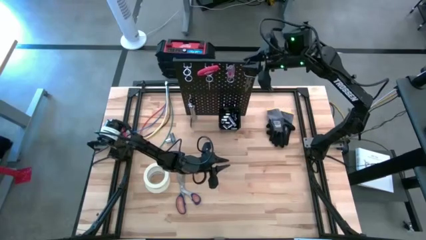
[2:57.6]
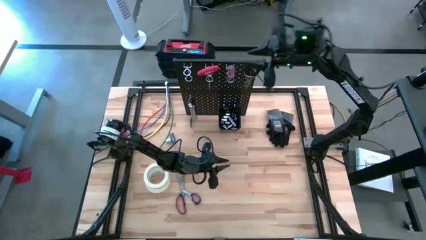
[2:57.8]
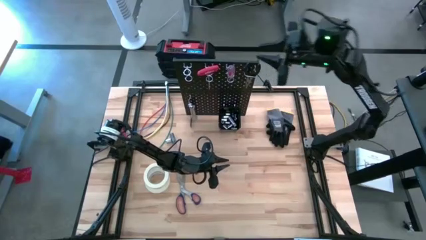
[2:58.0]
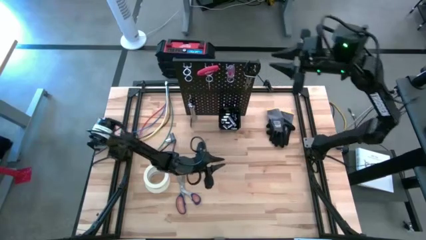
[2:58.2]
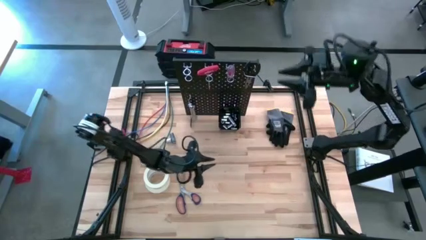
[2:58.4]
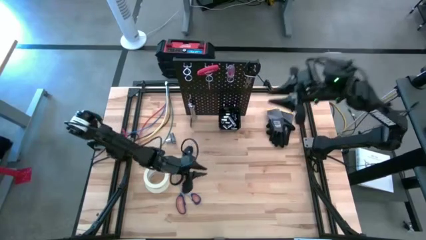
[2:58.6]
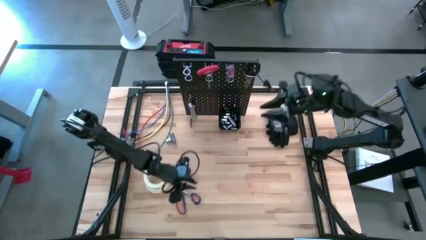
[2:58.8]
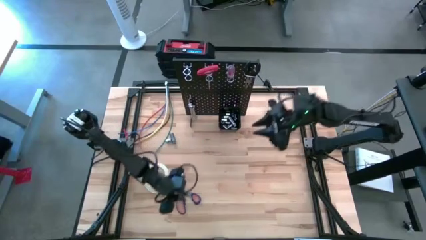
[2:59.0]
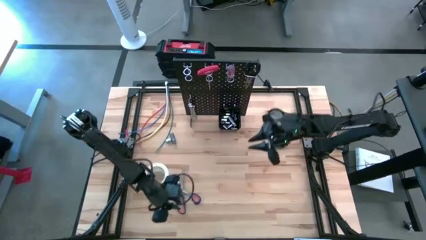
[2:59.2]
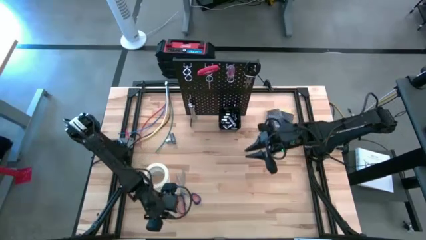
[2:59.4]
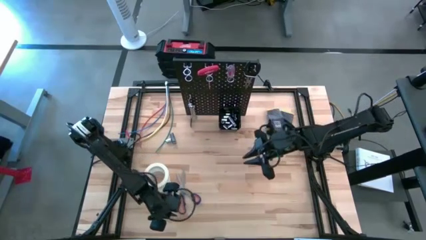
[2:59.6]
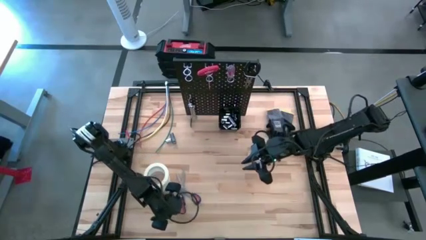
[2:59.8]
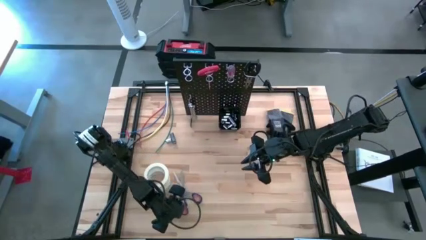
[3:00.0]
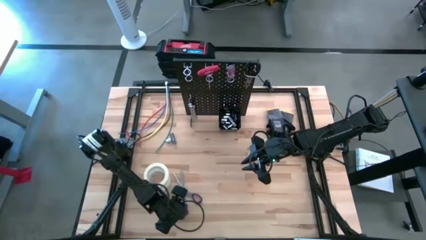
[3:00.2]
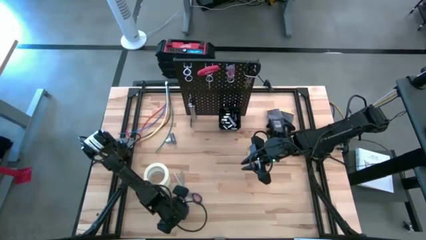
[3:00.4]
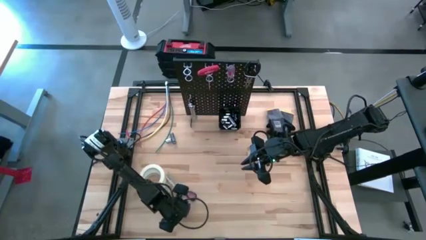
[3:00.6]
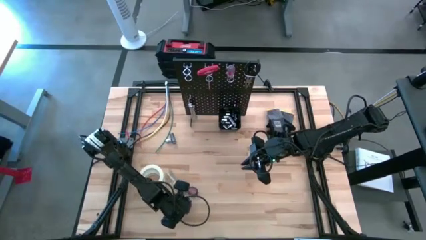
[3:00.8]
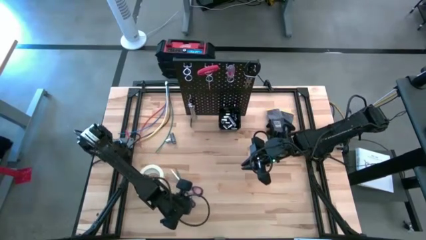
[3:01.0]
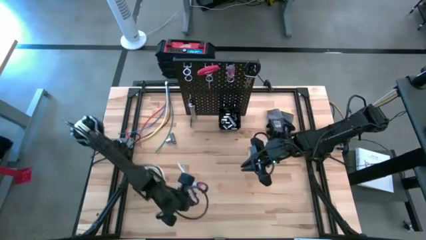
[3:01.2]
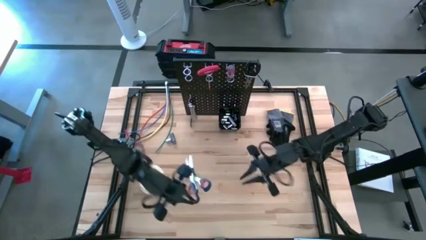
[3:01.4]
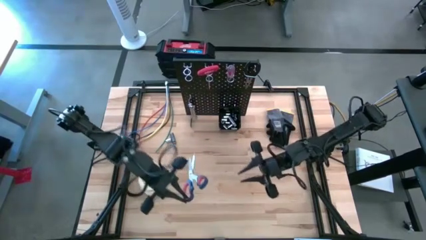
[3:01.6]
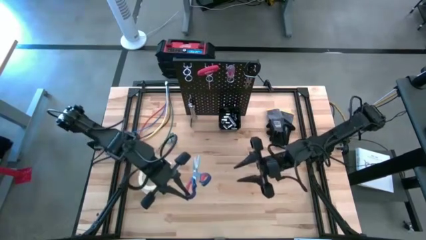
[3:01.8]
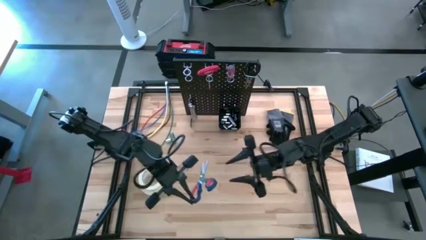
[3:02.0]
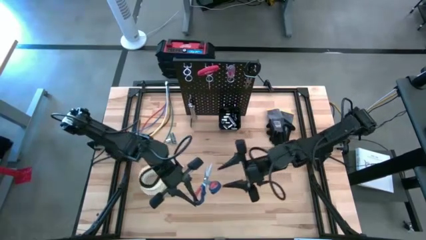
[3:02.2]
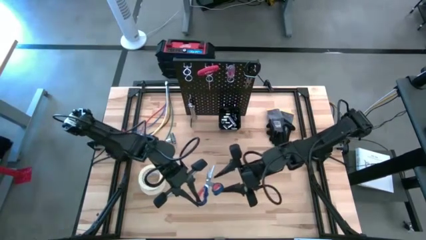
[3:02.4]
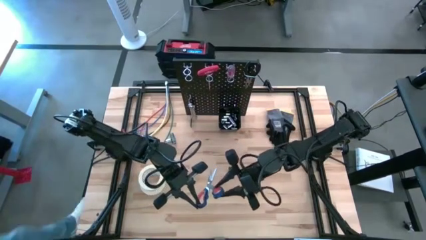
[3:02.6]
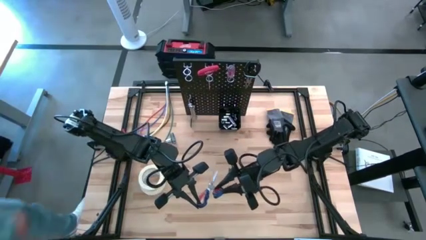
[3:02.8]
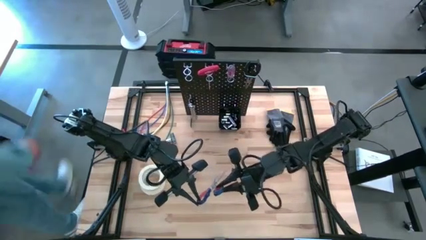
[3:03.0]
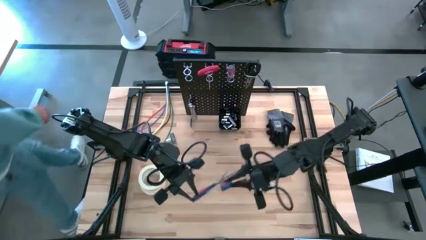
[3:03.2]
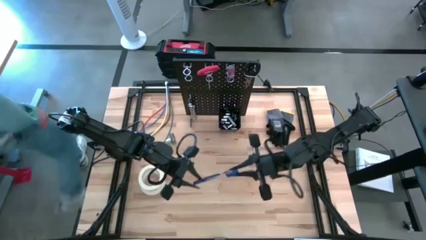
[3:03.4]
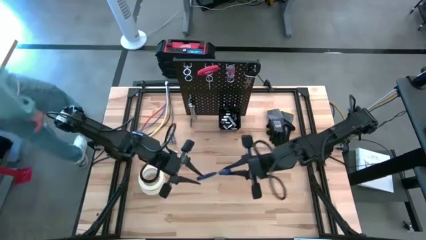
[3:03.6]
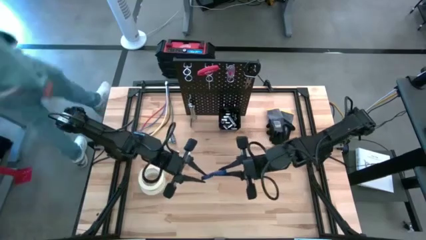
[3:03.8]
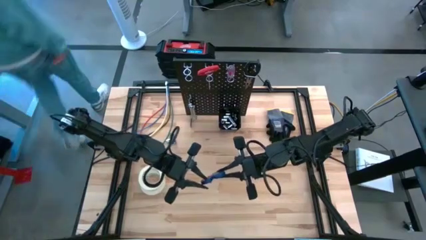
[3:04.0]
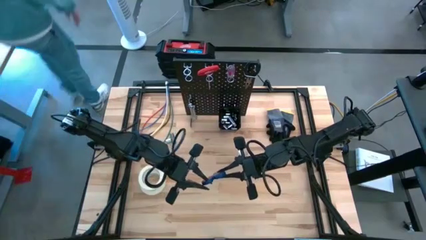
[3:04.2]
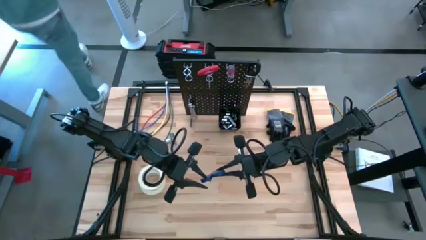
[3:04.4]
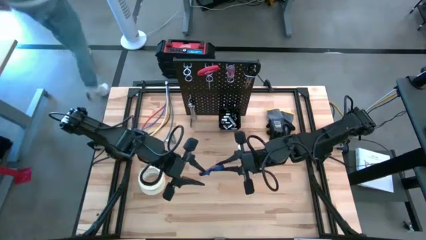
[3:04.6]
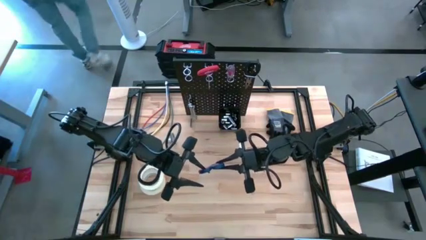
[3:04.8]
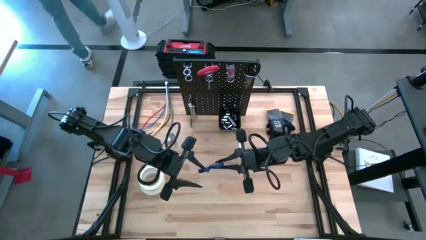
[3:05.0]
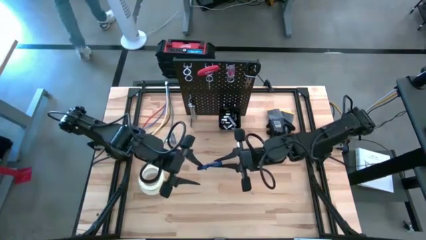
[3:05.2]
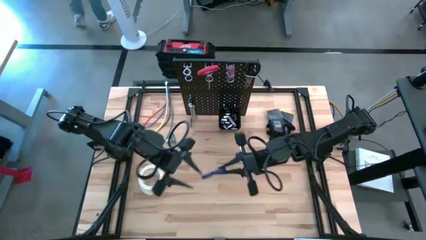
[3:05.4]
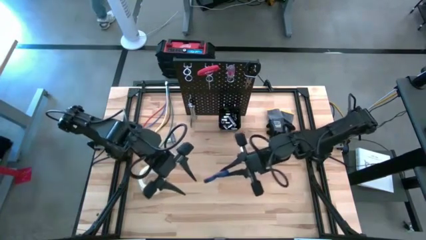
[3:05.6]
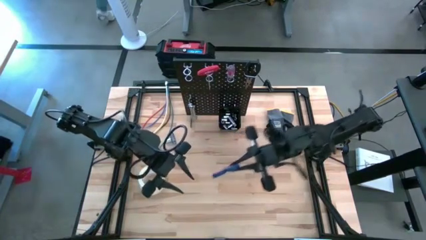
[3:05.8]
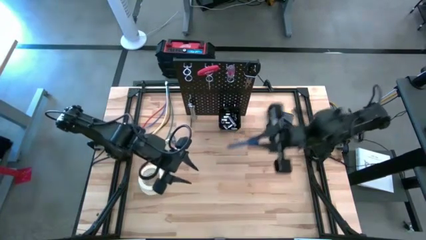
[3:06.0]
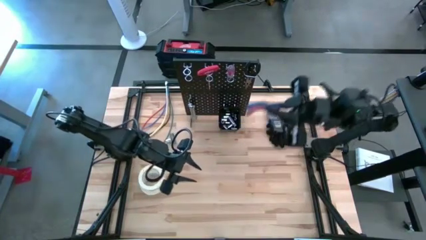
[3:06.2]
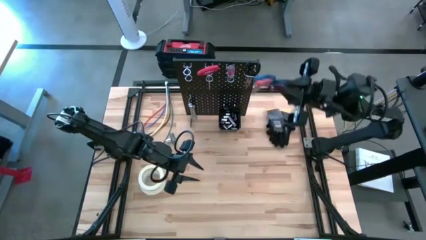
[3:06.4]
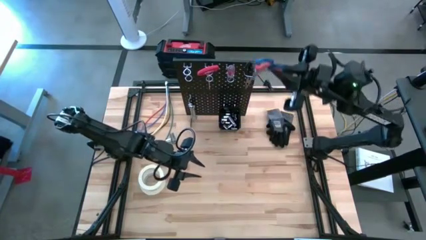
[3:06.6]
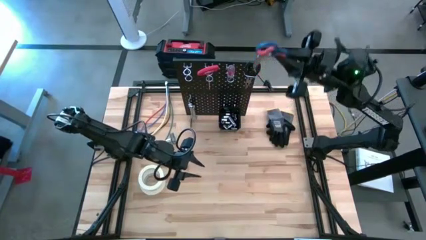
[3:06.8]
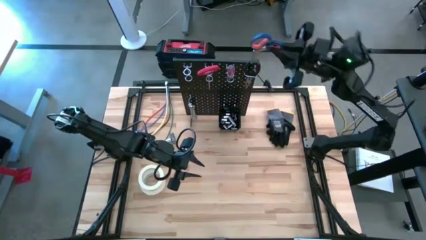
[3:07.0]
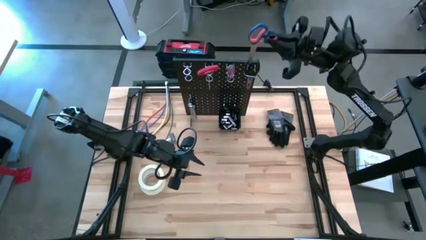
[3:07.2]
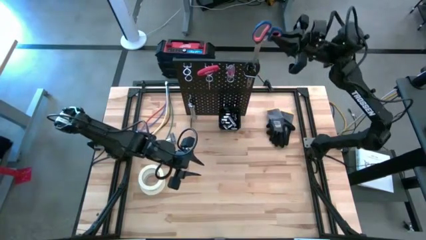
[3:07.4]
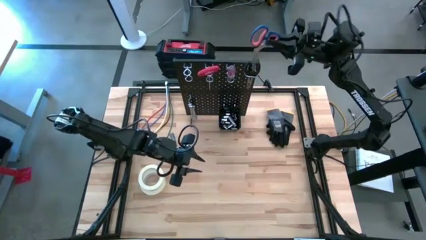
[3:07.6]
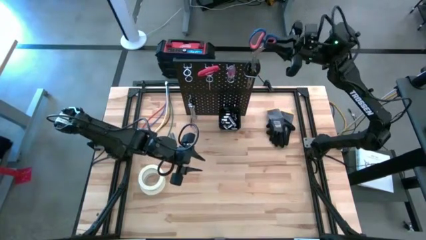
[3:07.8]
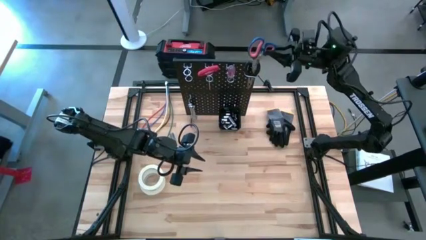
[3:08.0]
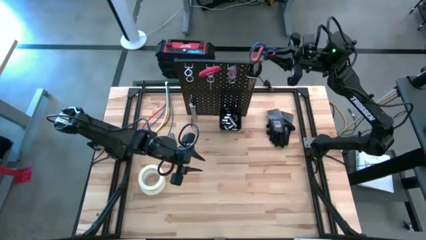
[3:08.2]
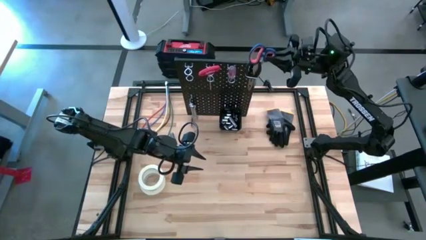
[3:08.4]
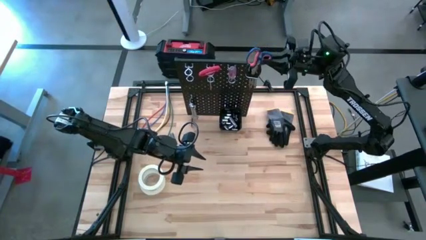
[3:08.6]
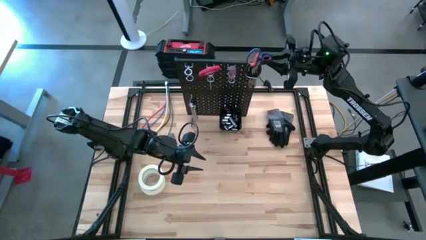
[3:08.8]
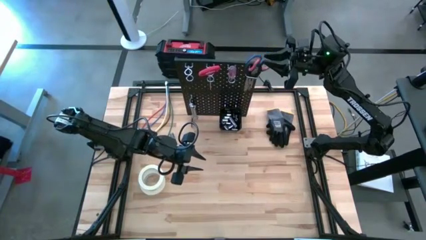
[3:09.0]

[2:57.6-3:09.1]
Task: Hang tools onto peg board
Hang the blue scissors on the peg board

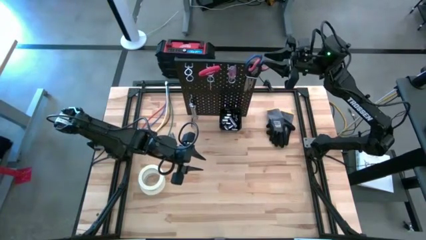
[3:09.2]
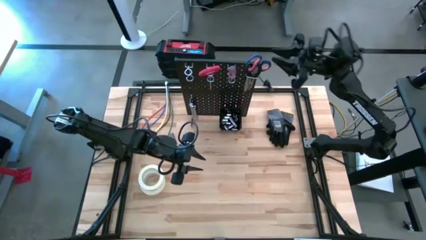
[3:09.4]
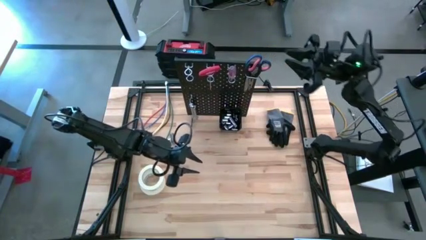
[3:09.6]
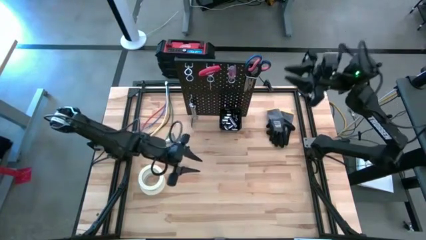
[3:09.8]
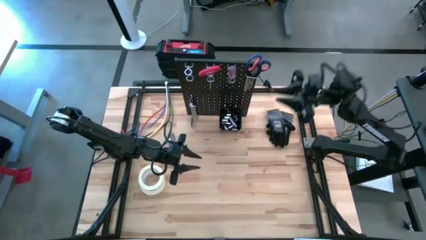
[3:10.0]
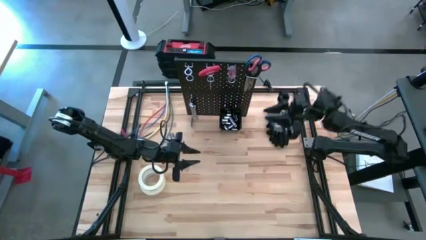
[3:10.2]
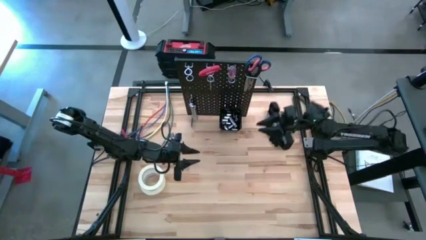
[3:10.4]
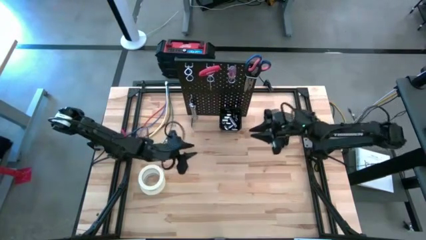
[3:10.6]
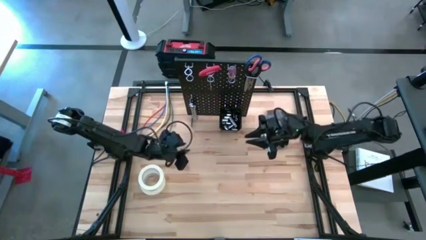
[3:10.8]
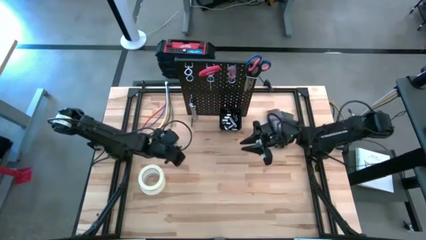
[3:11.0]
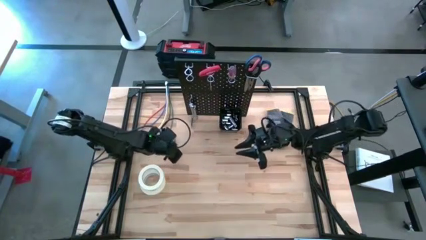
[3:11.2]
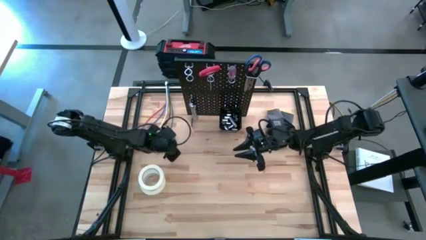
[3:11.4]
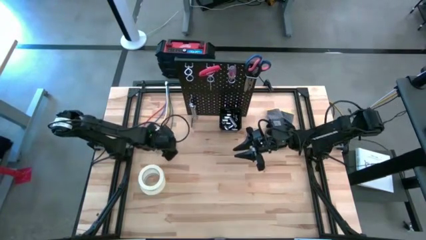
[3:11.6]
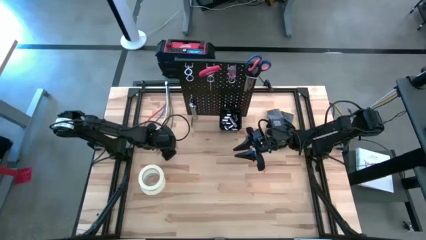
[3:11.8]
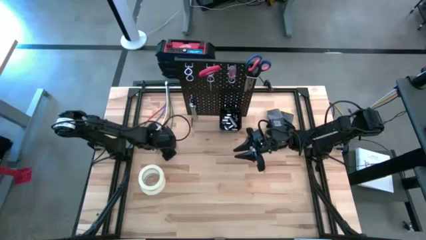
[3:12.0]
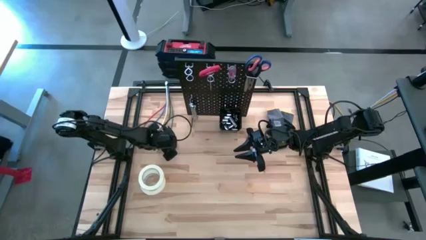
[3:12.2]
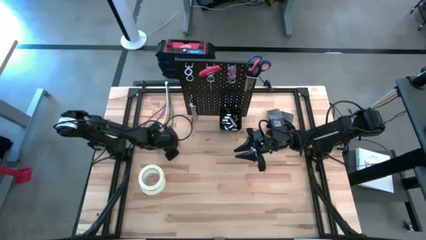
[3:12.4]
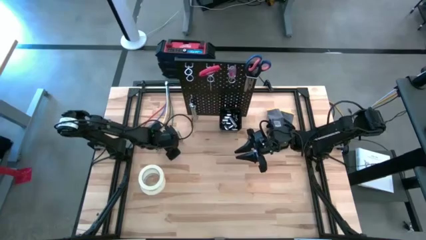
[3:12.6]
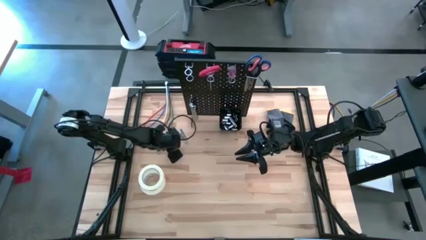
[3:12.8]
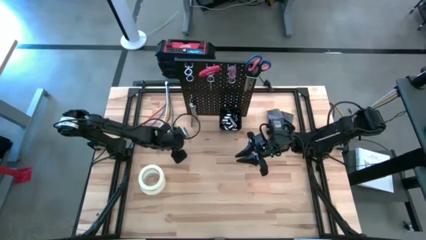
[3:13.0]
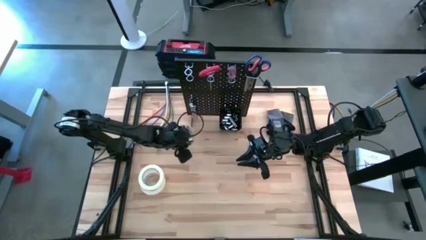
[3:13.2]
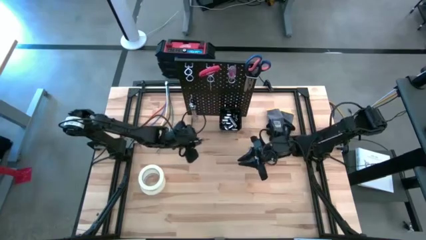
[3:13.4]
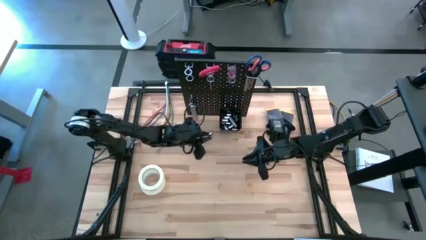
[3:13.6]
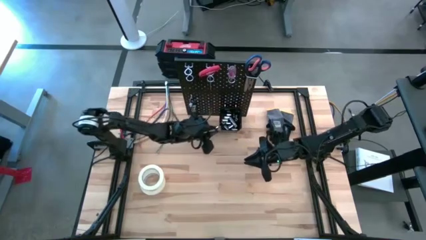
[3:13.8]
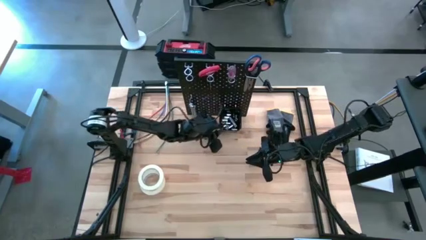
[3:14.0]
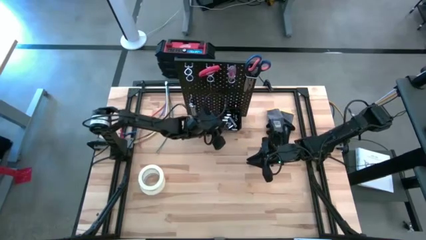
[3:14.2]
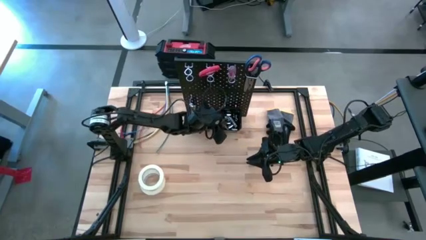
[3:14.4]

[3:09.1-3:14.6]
Put the socket into the black bin on the peg board
